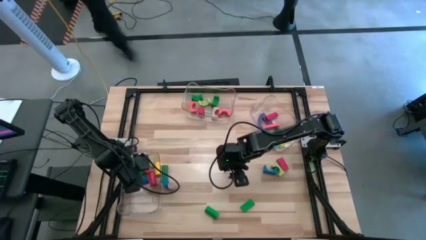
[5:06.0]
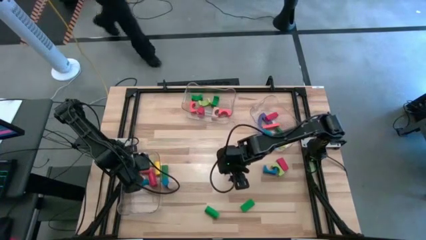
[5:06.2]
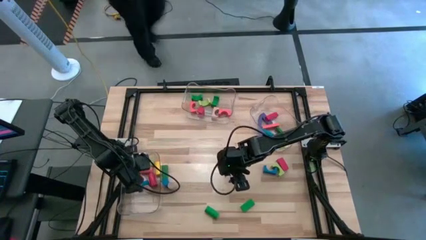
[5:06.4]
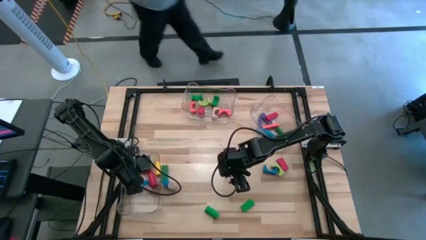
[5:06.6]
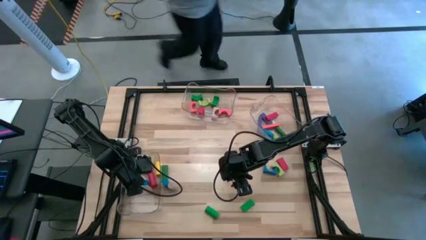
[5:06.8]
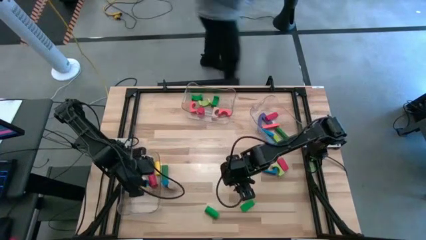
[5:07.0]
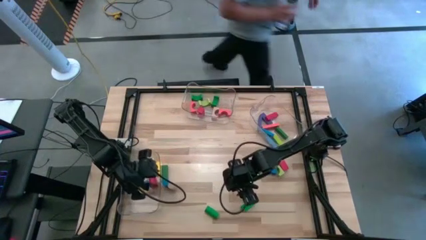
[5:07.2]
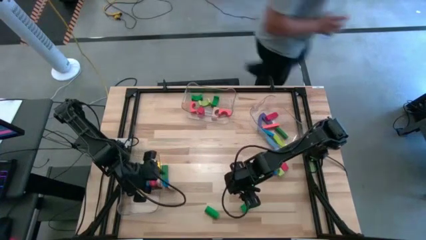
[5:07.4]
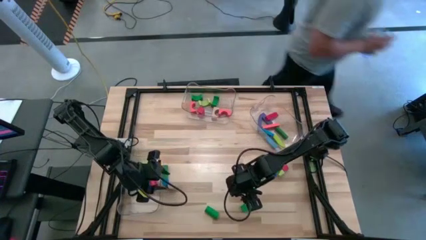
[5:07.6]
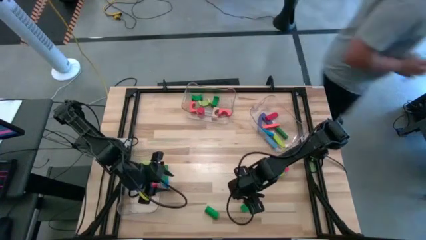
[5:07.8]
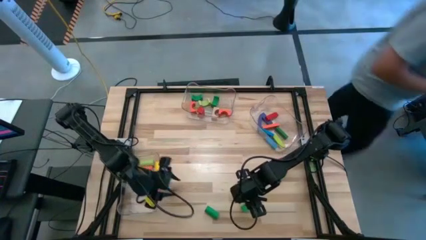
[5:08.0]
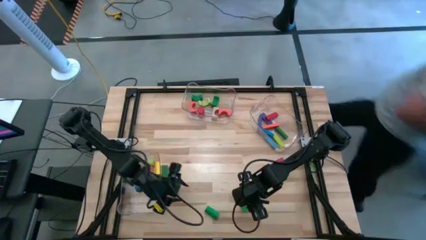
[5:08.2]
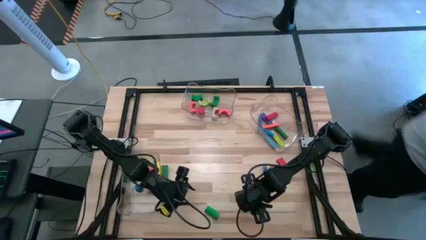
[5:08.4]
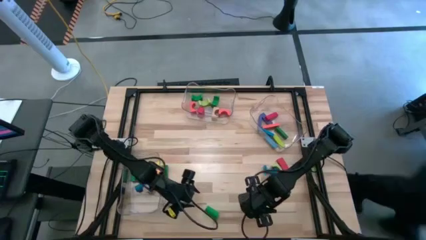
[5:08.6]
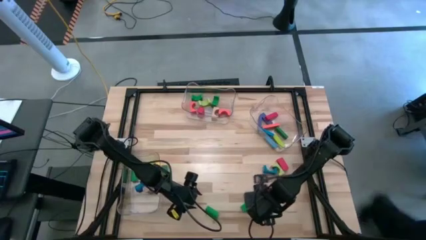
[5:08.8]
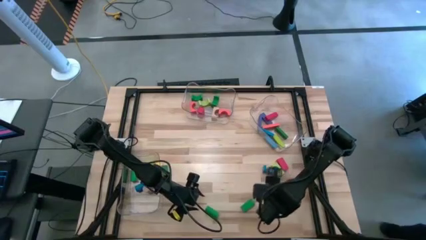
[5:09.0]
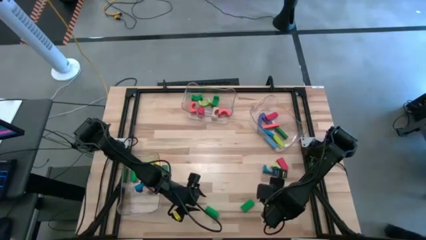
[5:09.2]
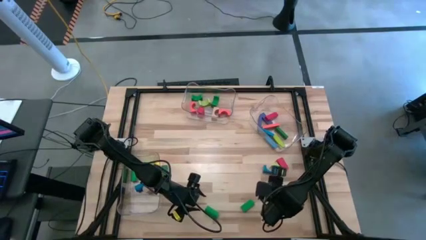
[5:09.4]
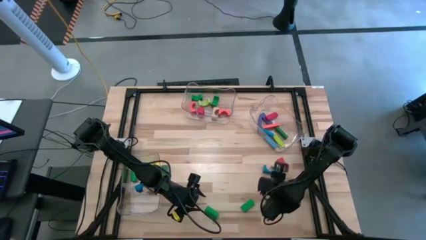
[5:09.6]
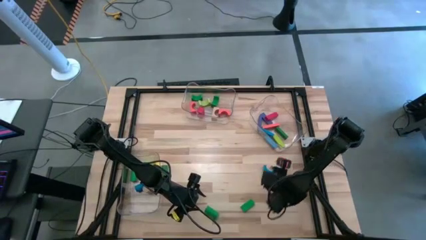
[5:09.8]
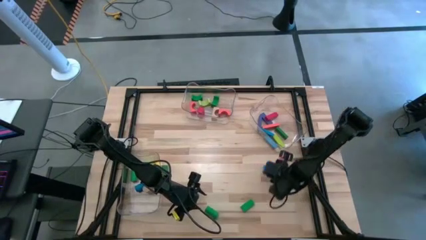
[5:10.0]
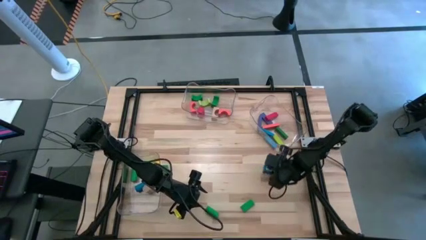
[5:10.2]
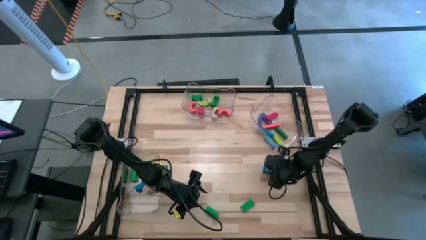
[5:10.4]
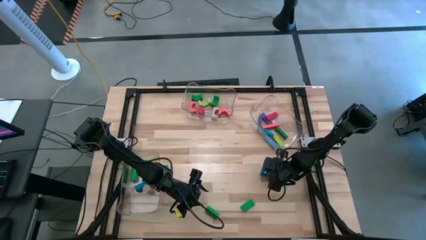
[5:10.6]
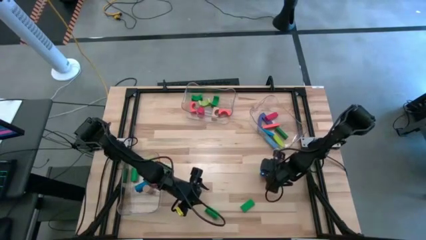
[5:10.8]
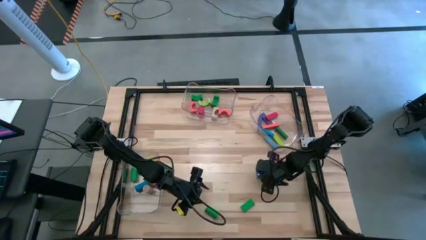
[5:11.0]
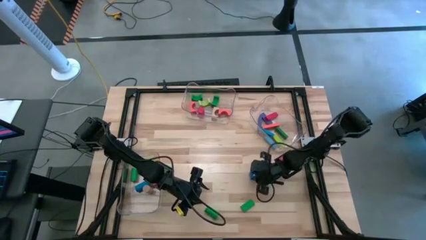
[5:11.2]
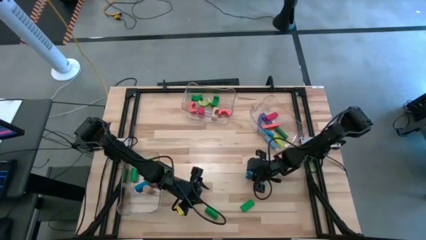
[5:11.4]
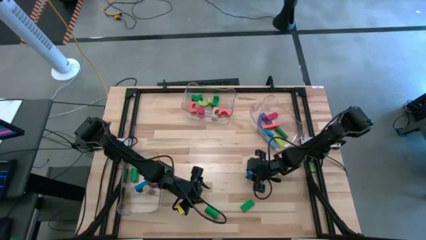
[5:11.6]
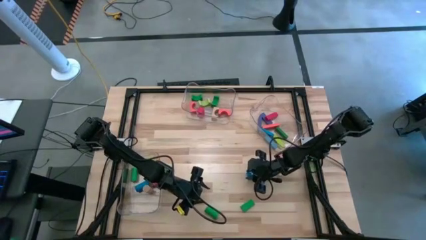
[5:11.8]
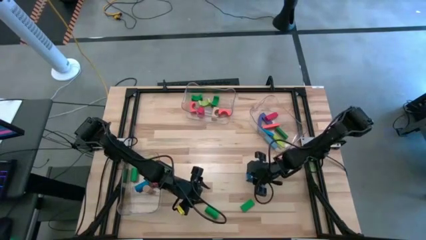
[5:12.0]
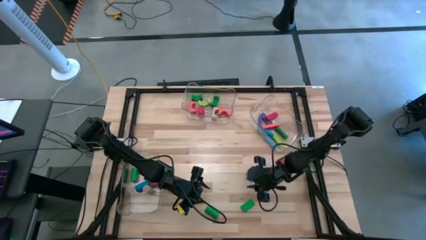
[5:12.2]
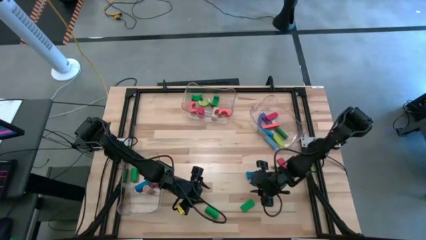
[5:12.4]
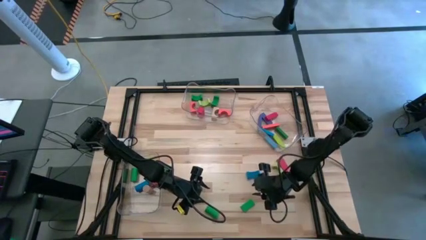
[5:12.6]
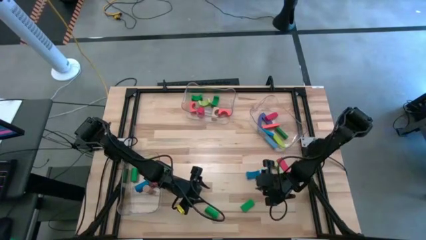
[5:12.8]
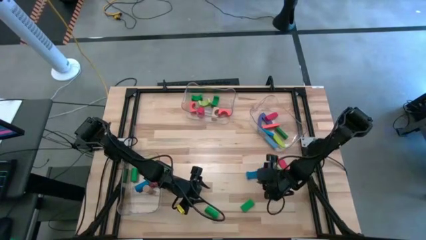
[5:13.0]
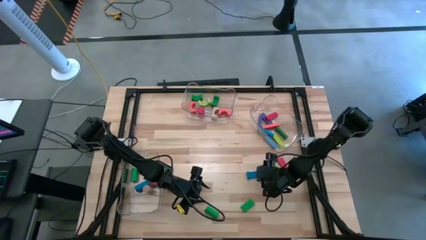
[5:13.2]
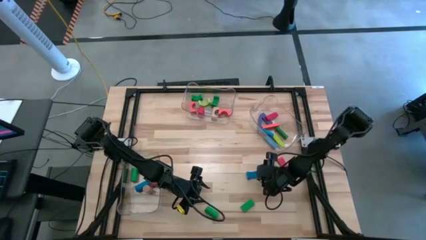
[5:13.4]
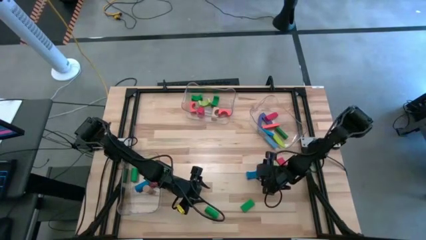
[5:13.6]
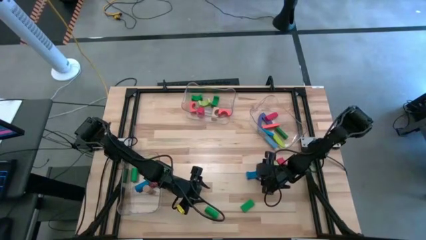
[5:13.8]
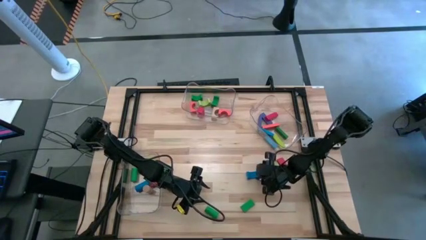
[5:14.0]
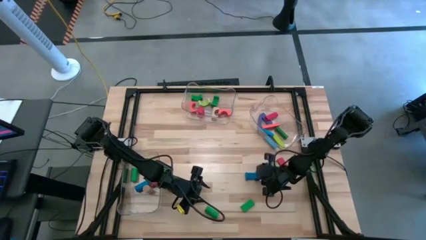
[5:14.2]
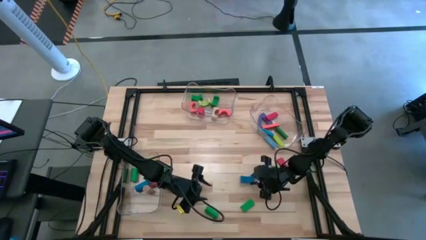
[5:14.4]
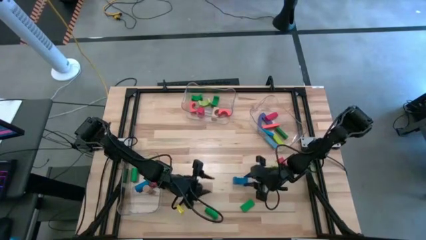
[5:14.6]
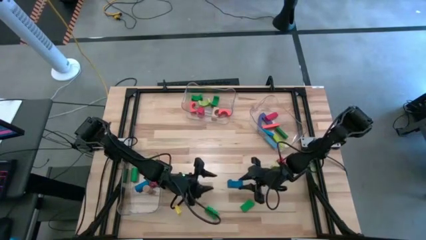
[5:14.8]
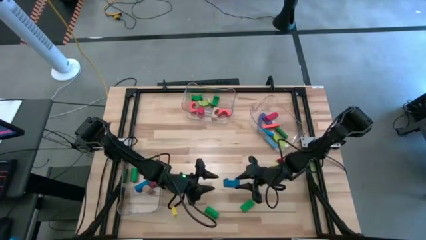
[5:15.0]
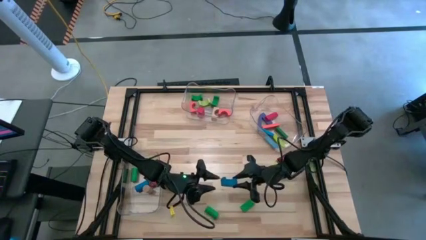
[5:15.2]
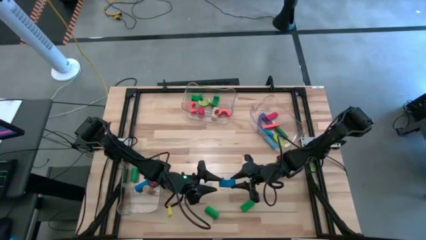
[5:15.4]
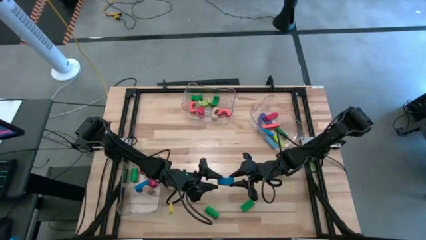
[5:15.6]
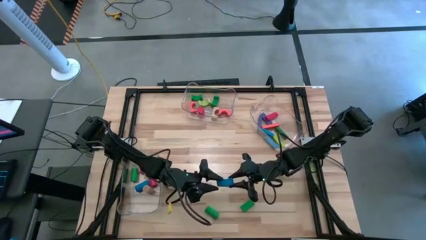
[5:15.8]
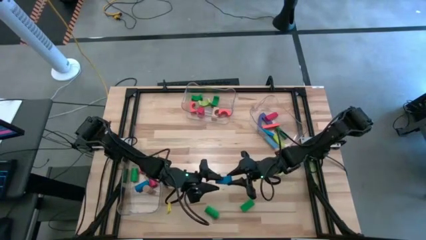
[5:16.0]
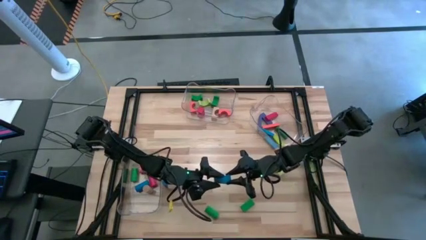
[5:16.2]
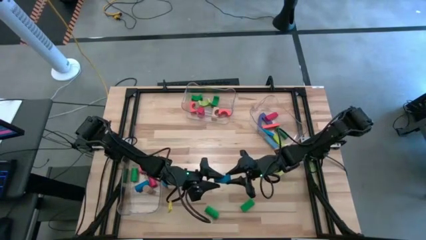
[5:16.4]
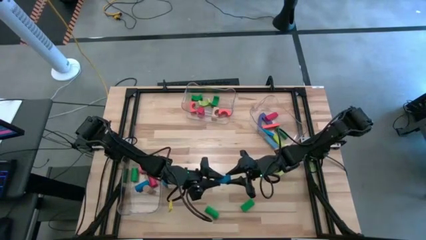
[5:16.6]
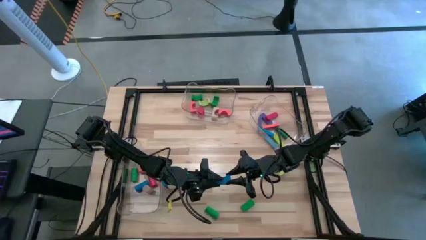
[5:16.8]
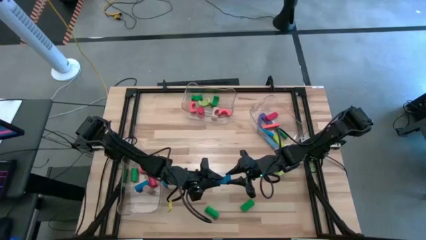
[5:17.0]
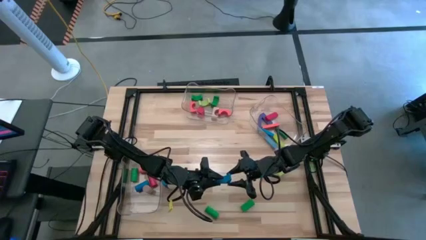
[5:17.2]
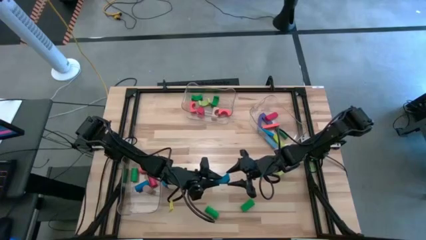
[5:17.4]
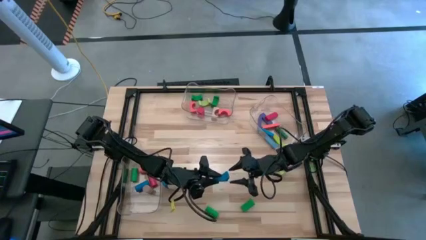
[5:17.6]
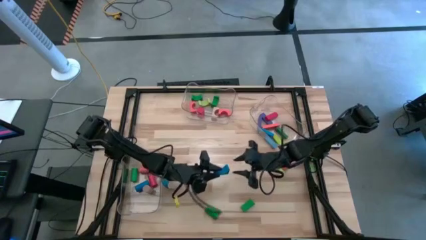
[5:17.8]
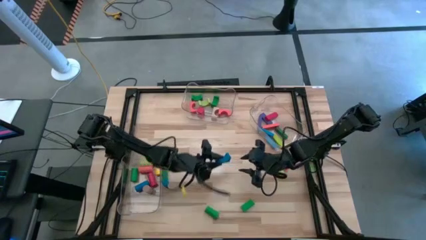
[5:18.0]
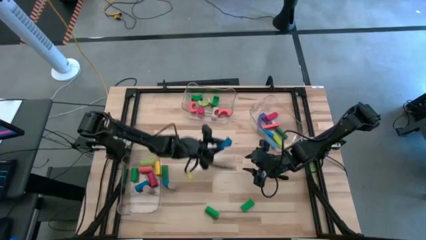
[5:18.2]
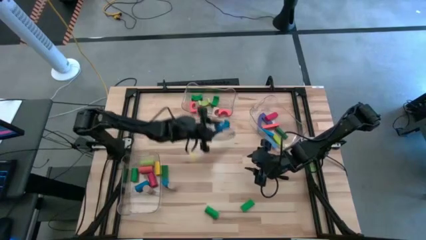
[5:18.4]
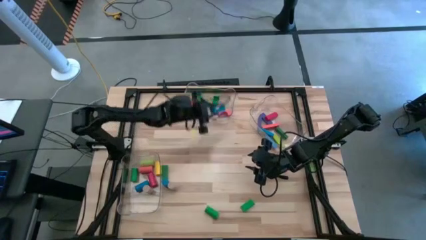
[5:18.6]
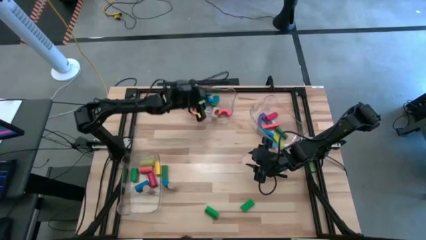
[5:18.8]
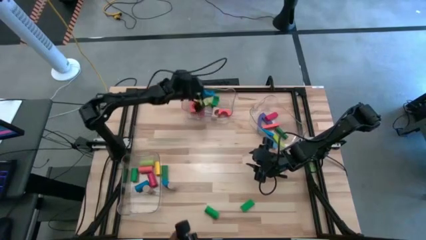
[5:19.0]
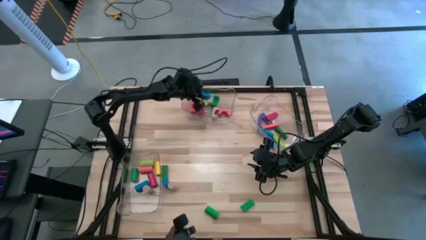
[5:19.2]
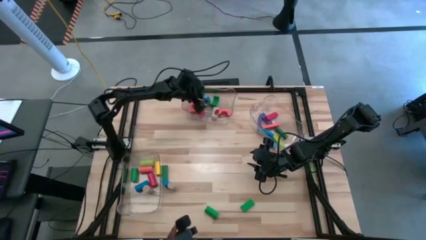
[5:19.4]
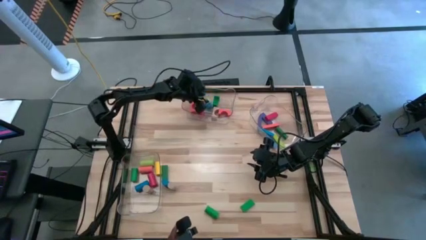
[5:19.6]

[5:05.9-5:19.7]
Task: Sort blocks by size
Put the blue arch block into the middle transparent bin

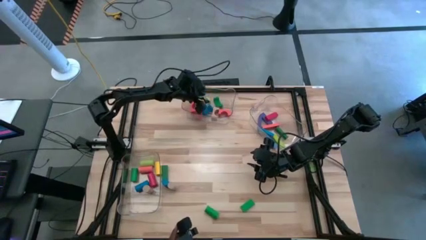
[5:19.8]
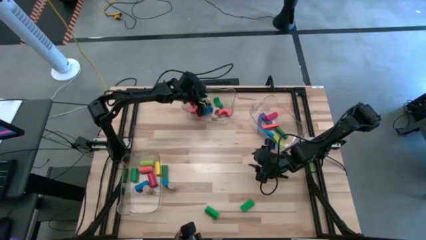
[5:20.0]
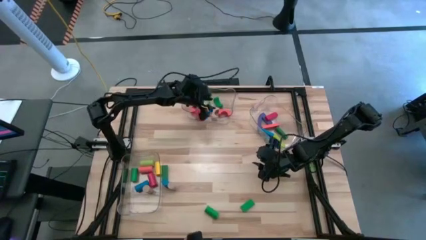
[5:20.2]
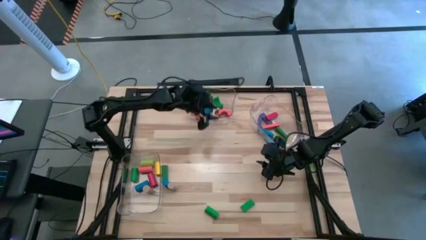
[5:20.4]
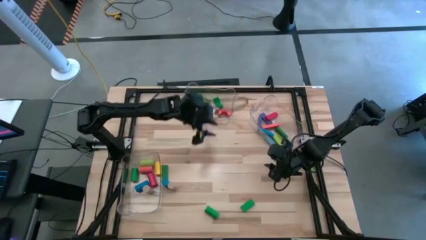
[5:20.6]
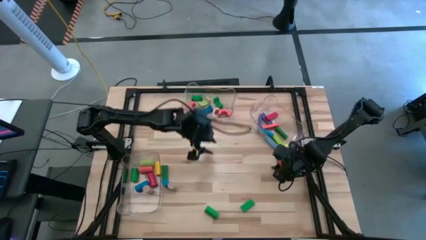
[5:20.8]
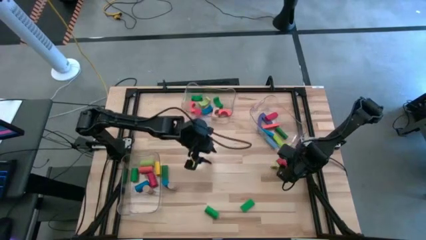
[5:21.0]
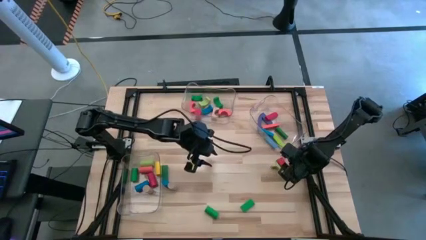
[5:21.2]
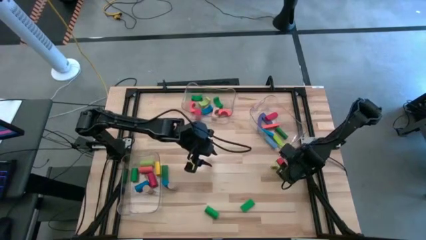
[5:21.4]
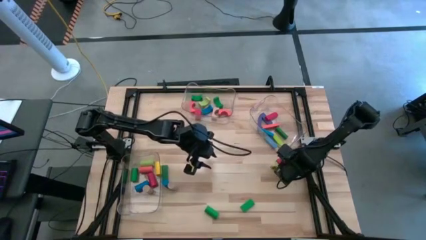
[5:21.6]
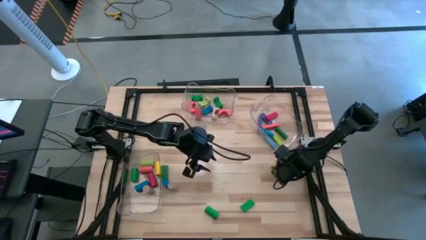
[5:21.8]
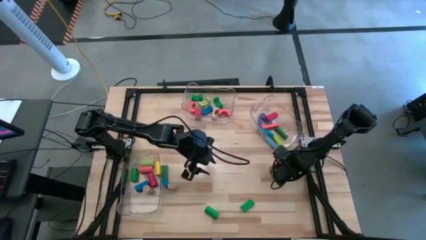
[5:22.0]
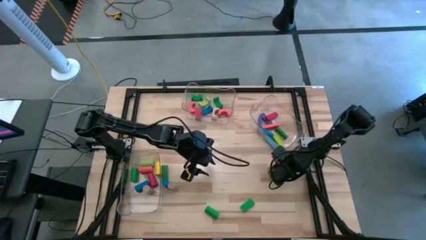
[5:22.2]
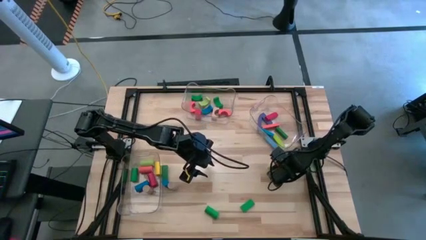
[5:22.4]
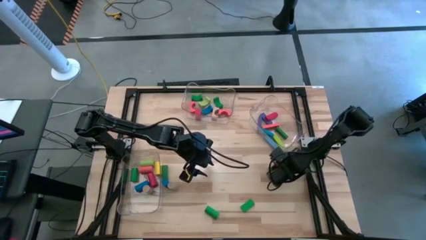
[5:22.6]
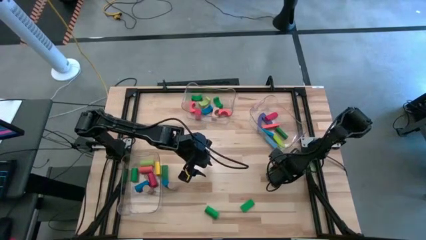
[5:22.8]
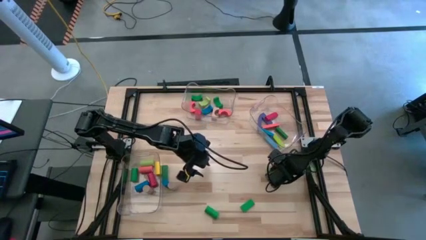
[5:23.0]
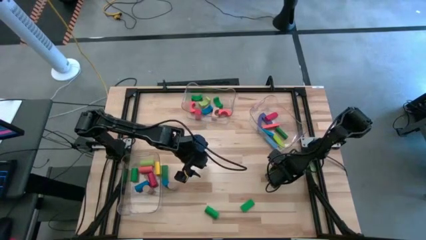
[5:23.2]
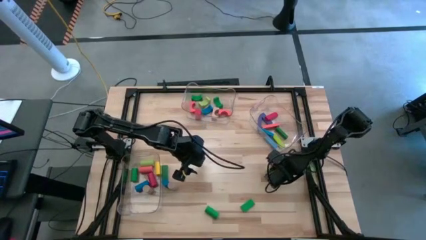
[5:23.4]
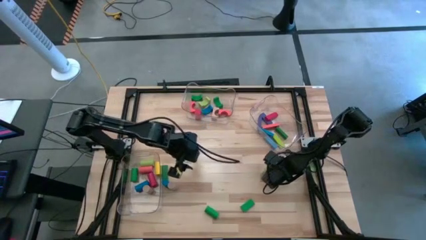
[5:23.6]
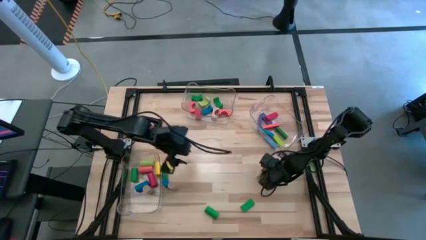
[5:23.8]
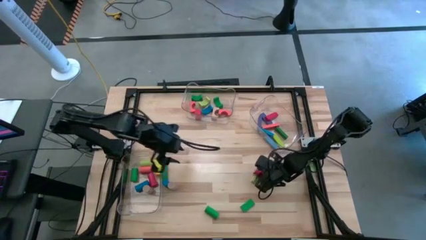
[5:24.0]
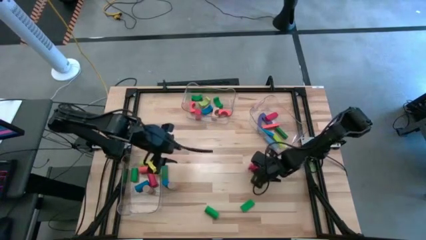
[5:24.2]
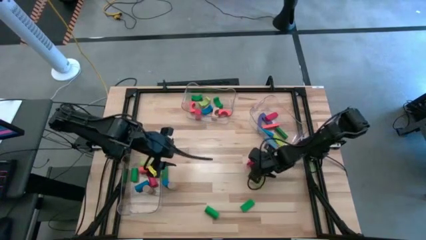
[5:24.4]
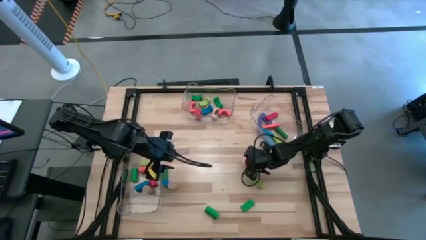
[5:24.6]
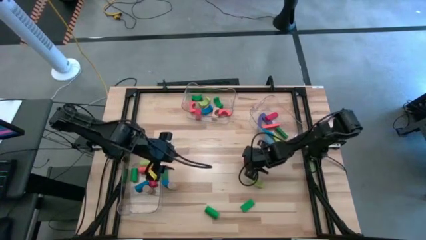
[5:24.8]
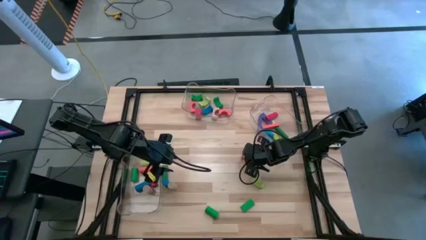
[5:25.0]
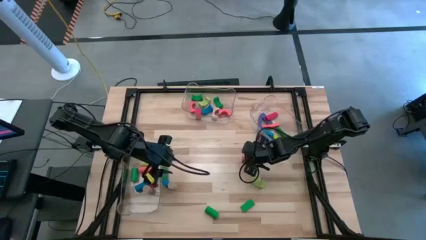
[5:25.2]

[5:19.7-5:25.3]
Move the red arch block to the center of the table
